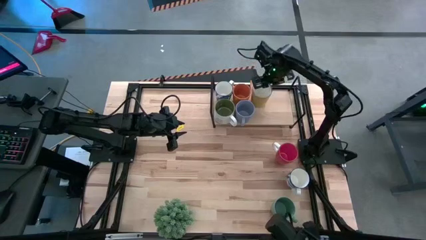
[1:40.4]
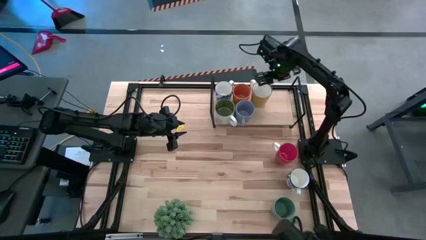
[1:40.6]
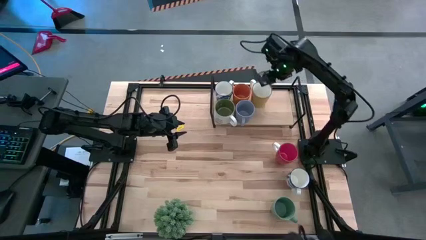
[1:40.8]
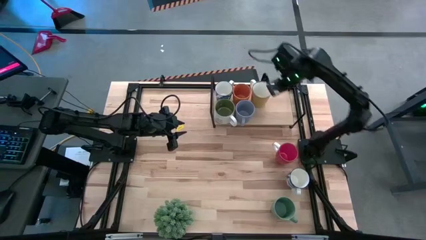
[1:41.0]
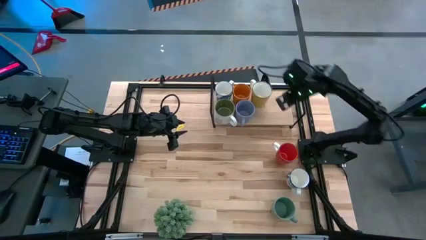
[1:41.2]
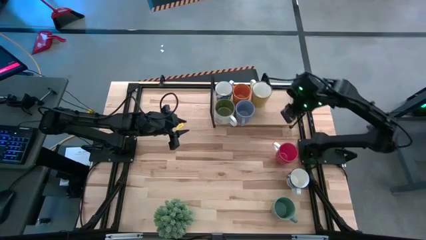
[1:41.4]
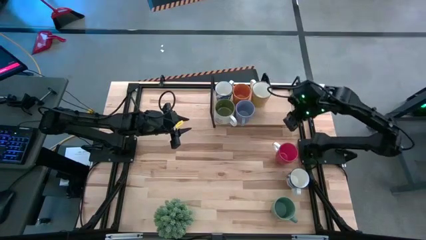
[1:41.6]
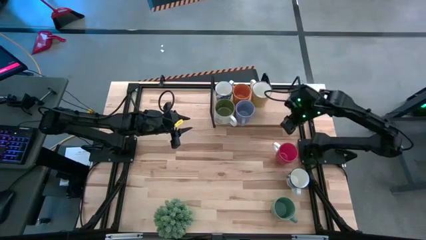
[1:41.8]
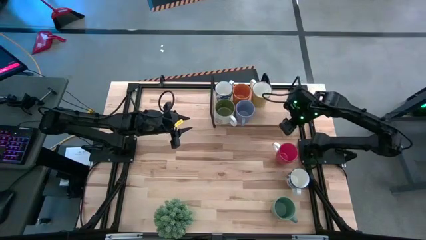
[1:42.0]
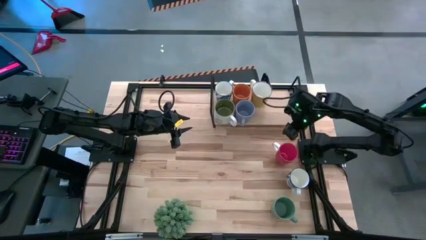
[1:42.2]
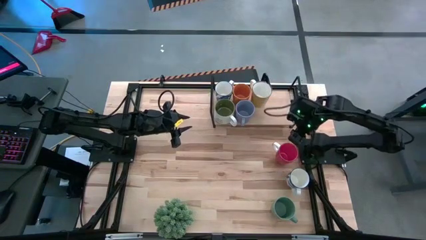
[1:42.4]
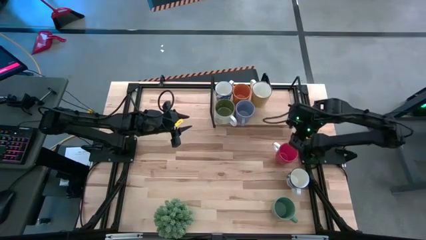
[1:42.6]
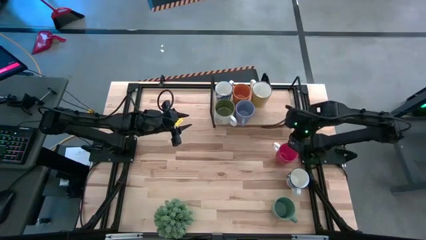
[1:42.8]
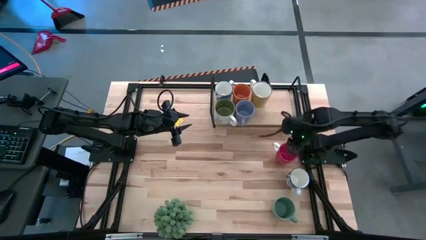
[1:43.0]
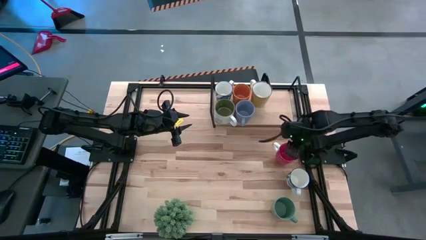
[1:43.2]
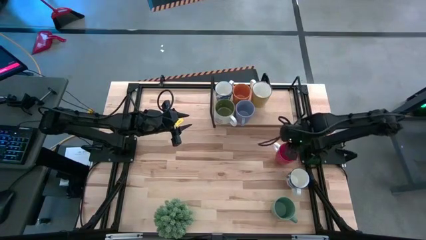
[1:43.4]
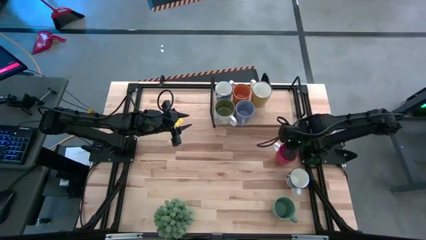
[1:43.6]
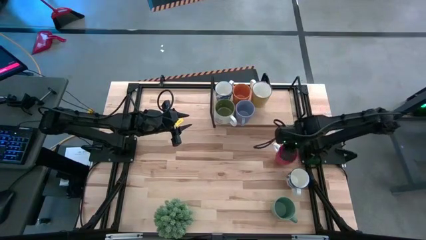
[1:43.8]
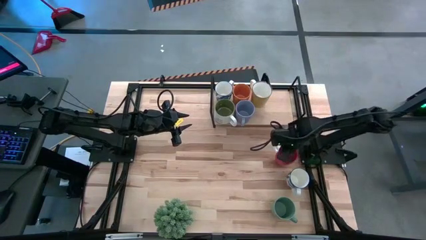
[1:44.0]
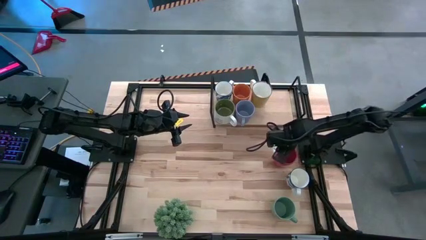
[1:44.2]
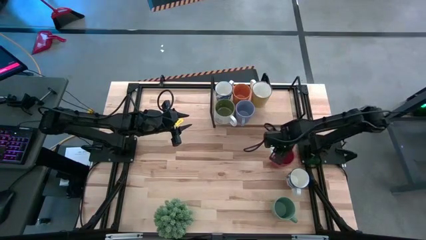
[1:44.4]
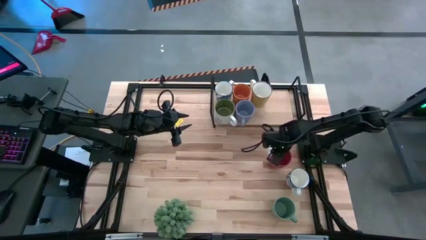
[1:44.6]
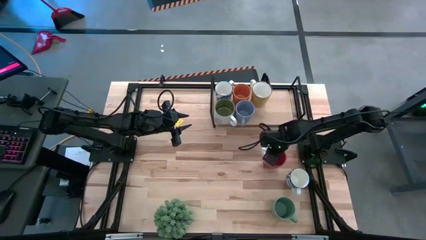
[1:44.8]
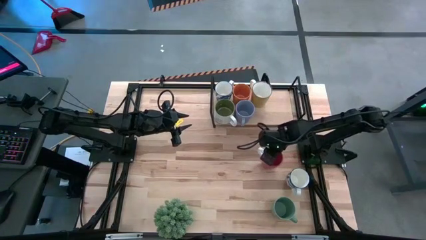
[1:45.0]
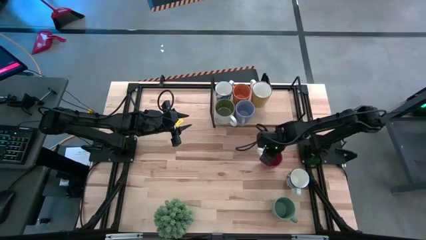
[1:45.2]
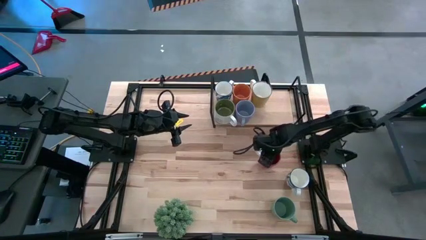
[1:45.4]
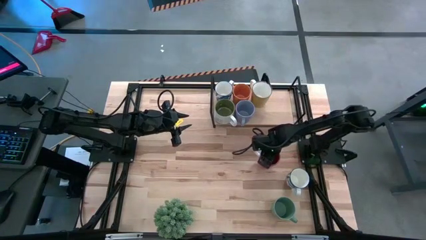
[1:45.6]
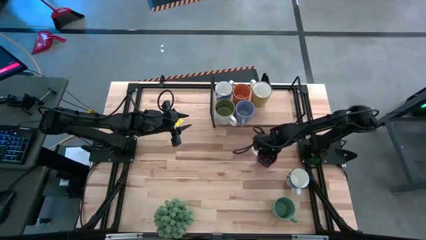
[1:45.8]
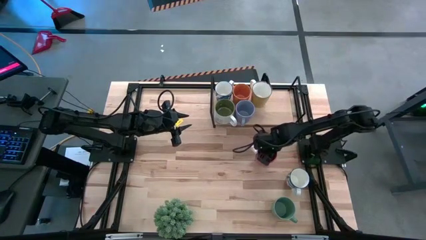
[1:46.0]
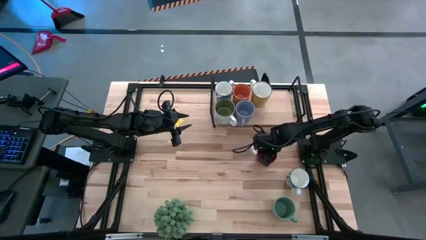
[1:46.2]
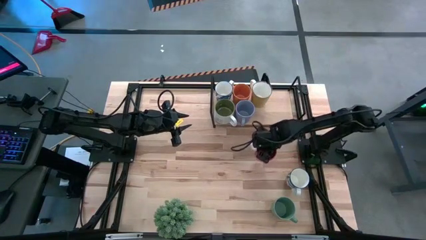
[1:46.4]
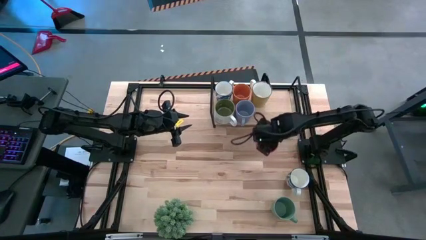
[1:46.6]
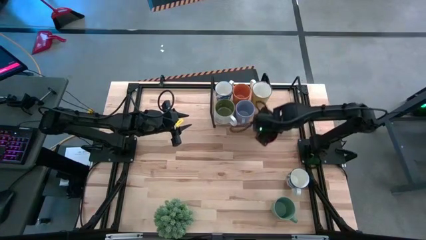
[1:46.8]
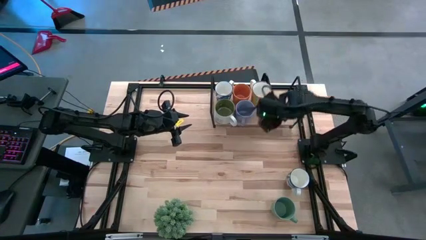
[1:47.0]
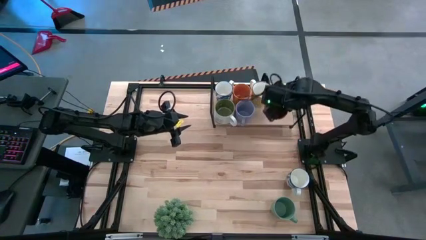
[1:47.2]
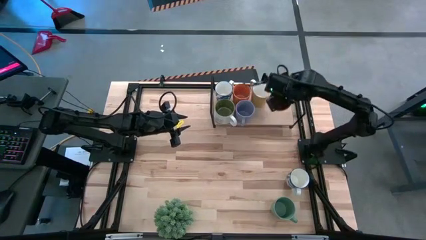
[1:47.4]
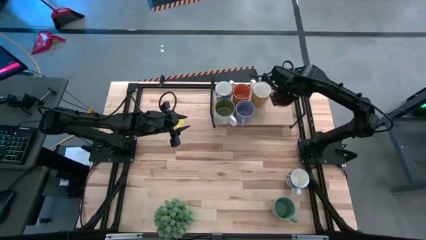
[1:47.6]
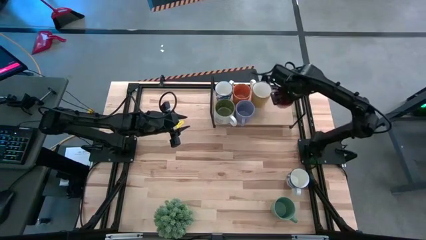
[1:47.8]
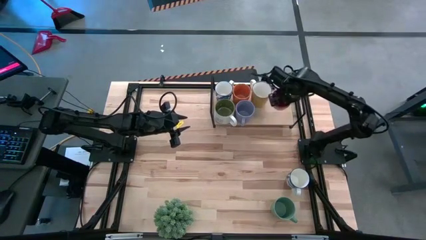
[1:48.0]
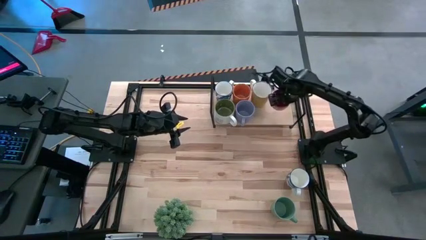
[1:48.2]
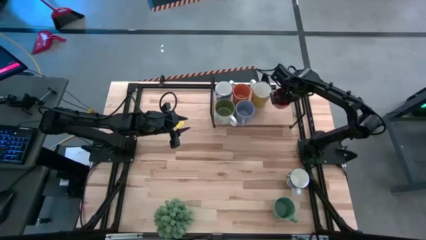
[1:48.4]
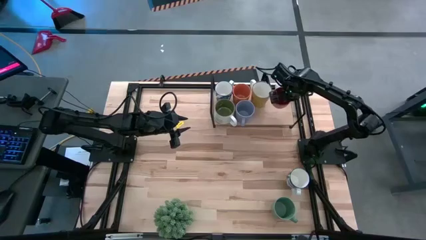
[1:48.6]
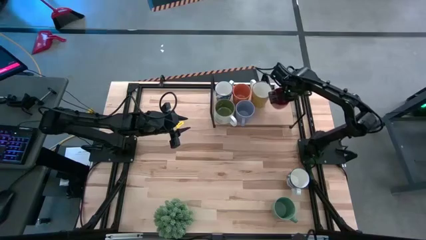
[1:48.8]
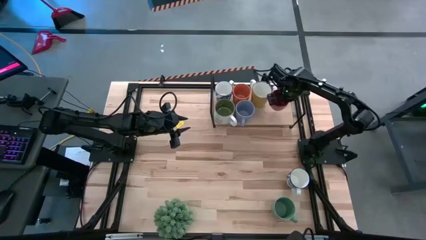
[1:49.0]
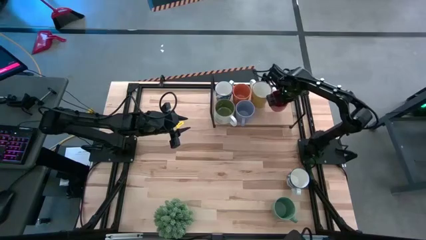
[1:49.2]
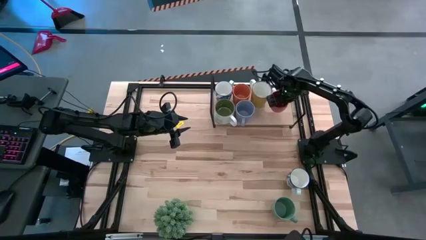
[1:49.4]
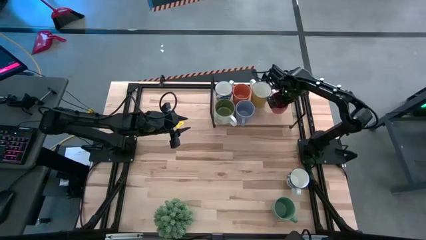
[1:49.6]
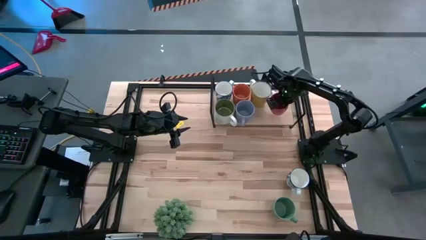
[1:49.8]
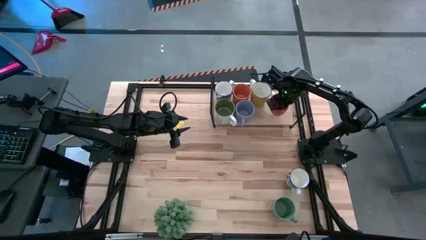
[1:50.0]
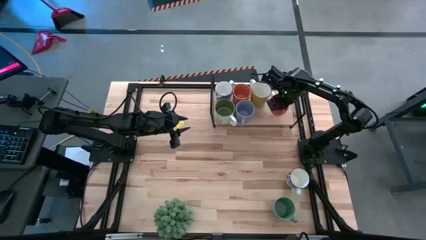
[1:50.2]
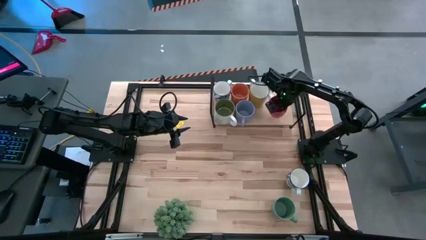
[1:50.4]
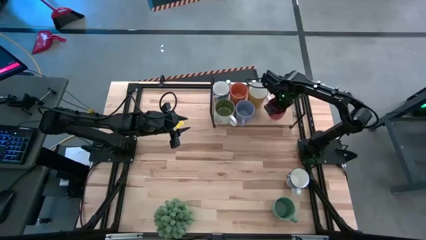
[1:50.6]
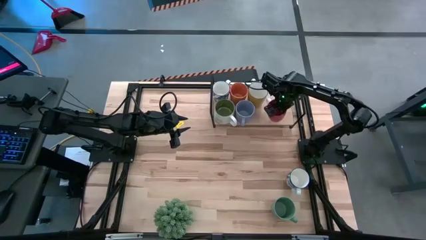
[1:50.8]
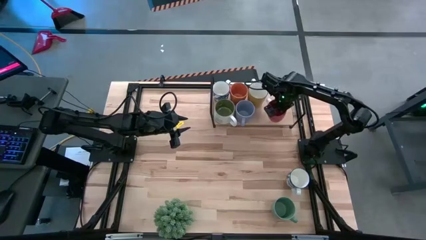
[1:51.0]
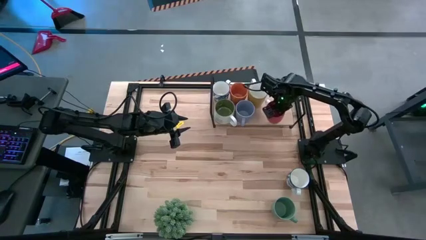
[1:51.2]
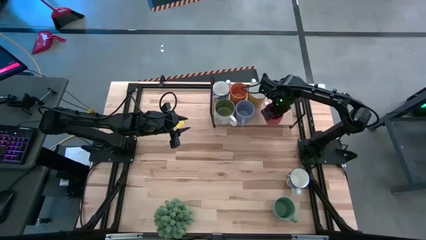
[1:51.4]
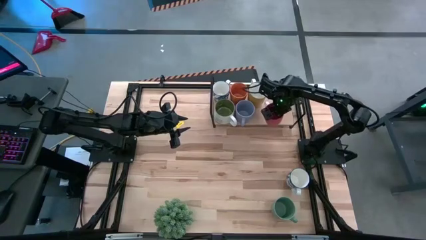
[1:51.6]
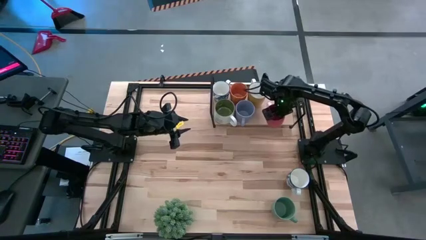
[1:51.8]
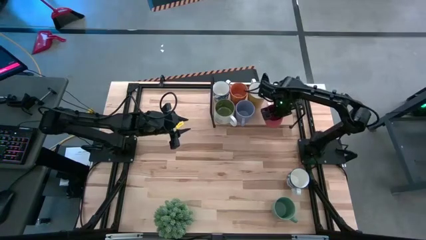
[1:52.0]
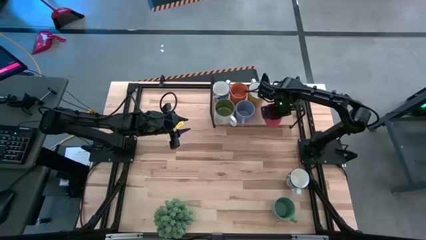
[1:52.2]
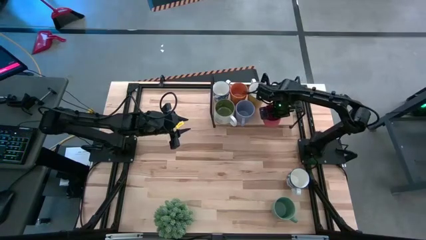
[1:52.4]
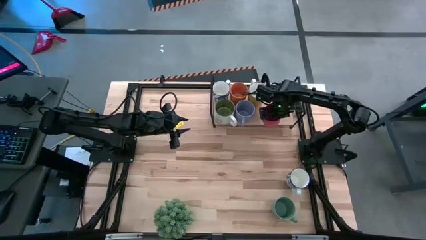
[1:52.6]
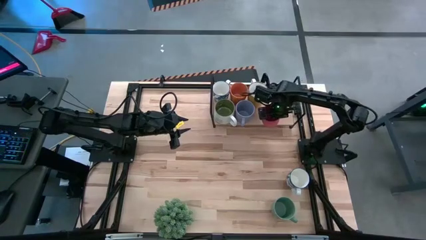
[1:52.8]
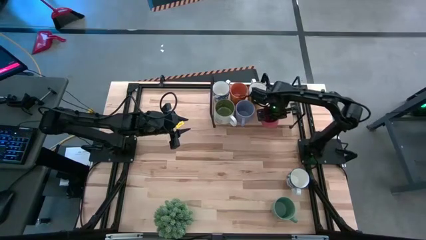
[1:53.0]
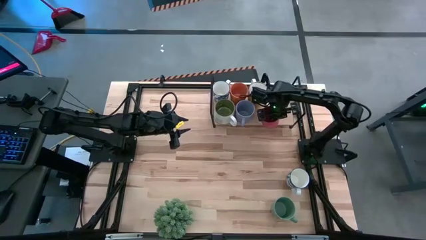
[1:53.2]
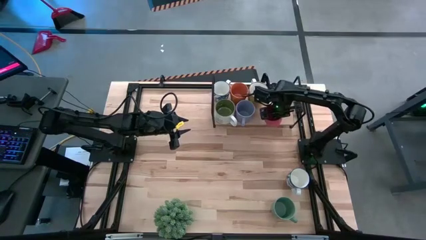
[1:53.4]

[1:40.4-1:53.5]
Task: Place coffee mugs
Put the red mug on the shelf

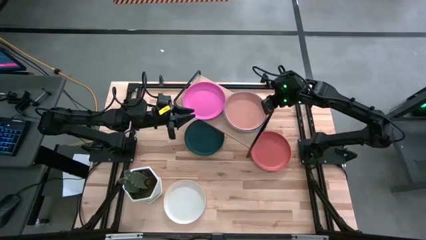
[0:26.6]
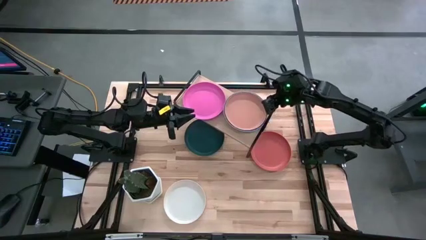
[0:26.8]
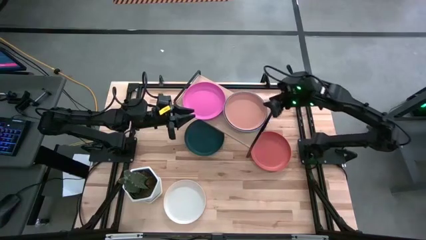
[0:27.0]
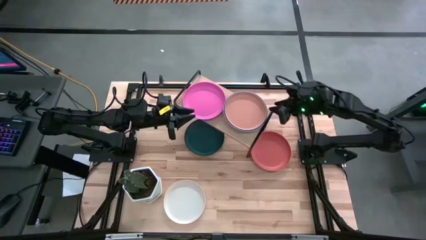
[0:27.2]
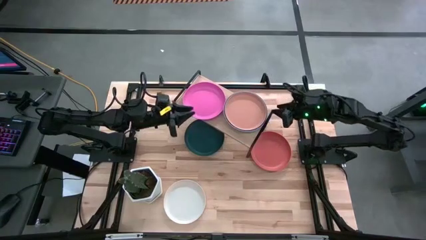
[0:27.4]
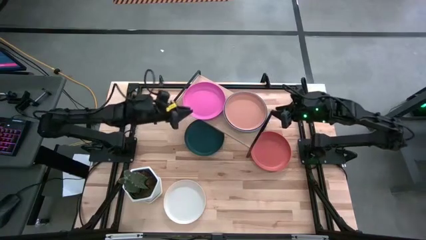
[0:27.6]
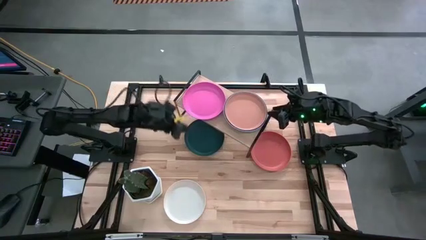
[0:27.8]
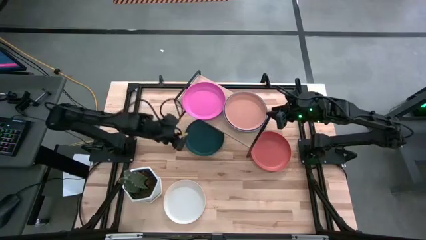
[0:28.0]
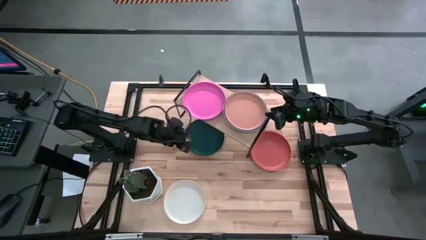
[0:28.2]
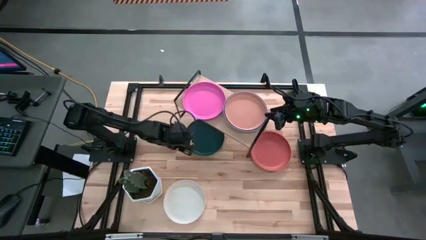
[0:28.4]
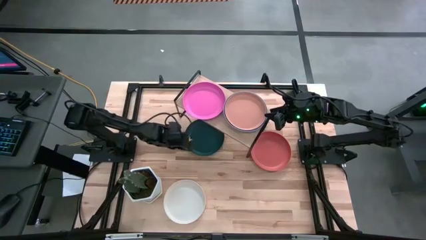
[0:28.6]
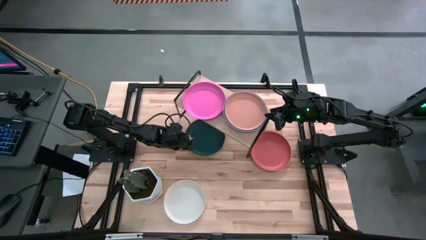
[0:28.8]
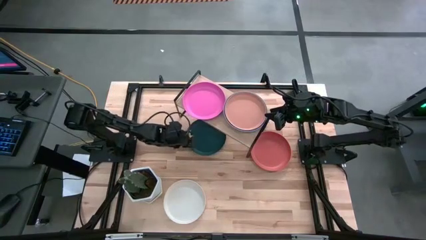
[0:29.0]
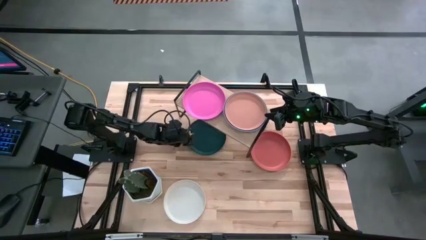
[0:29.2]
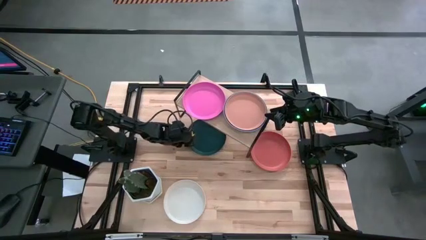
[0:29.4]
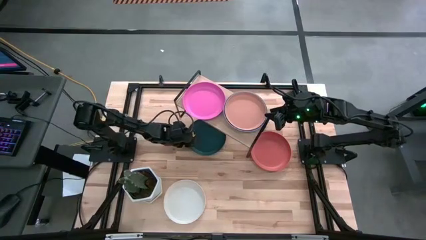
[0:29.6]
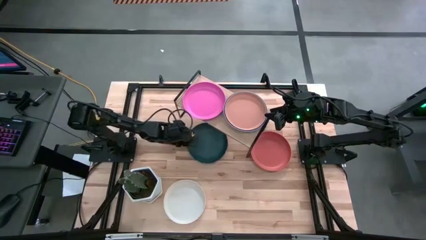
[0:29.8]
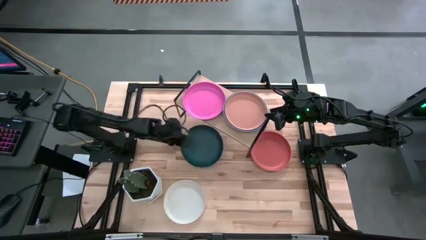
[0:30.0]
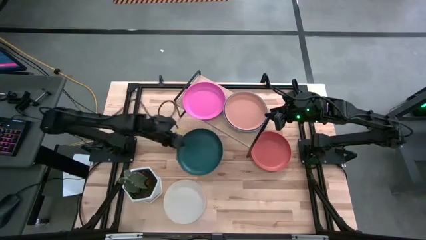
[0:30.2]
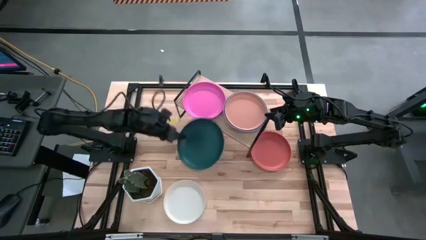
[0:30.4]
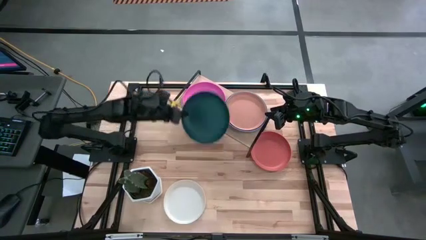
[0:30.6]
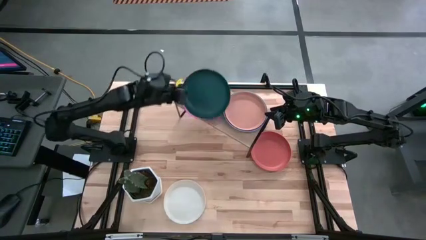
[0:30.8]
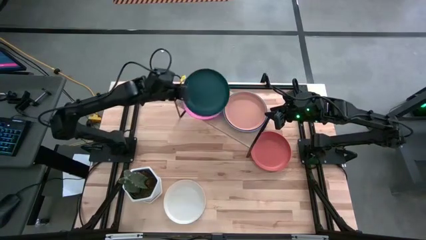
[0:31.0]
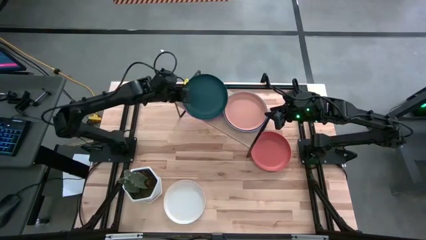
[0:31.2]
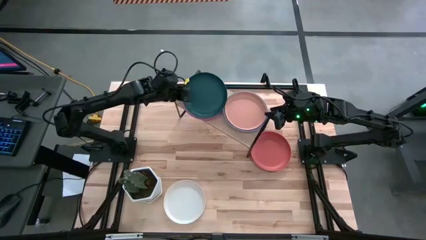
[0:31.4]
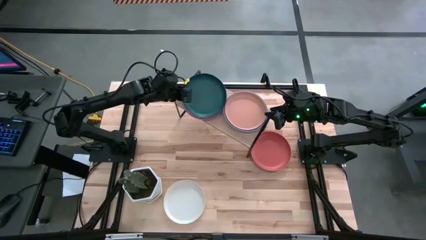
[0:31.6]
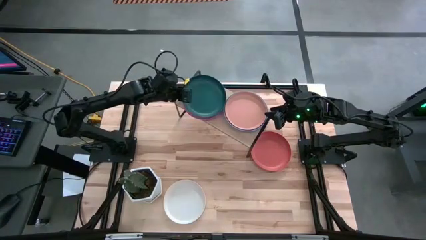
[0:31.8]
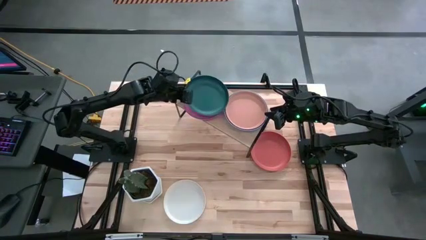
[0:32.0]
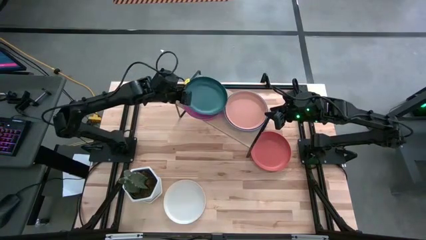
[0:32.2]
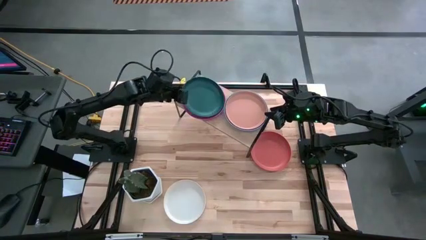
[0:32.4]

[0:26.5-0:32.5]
Task: Place and stack plates onto a shelf
Stack the green plate on top of the pink plate
